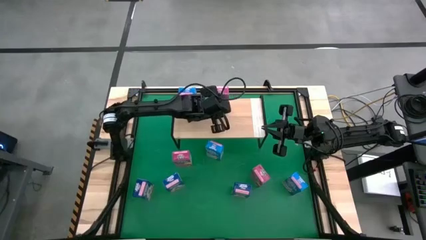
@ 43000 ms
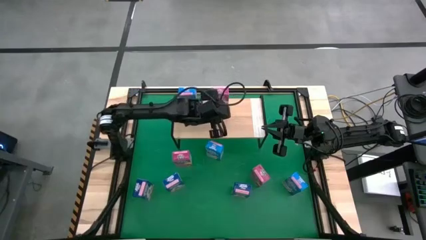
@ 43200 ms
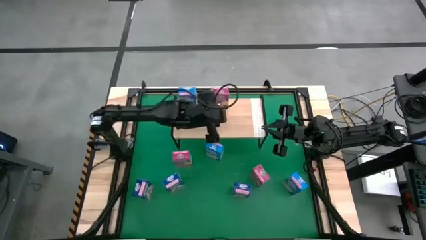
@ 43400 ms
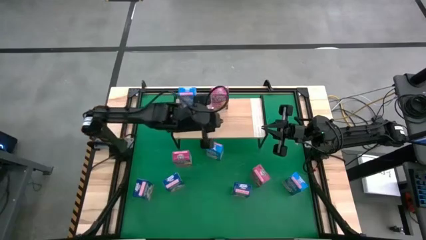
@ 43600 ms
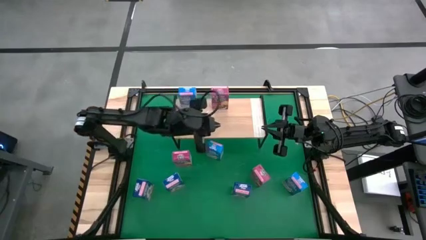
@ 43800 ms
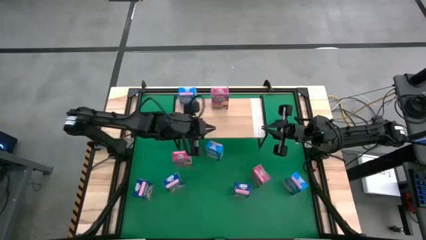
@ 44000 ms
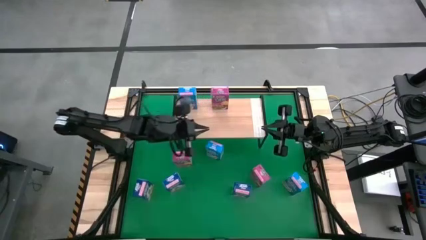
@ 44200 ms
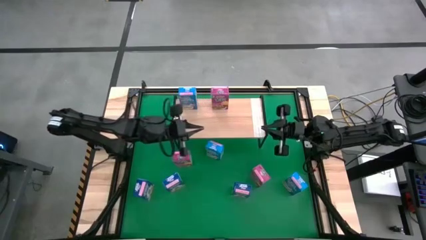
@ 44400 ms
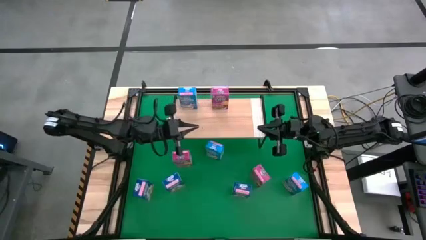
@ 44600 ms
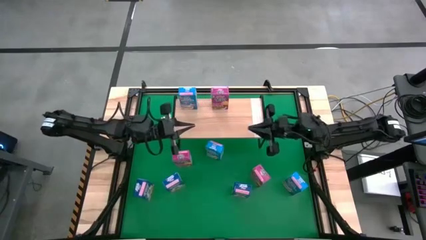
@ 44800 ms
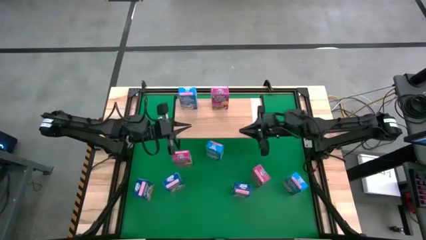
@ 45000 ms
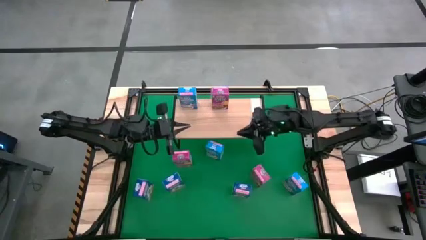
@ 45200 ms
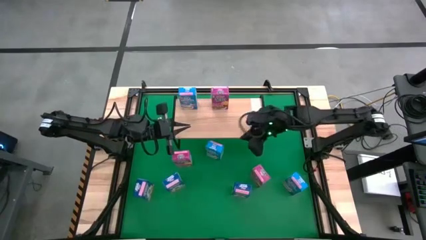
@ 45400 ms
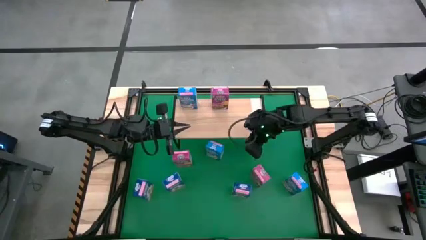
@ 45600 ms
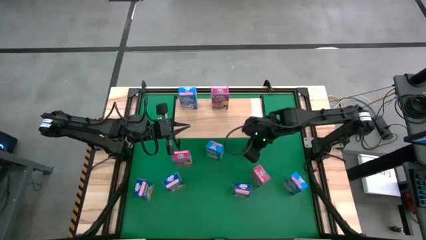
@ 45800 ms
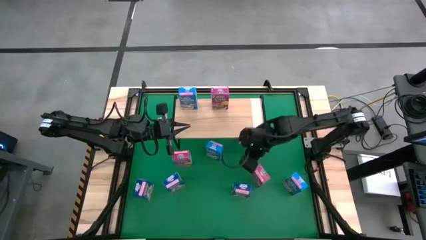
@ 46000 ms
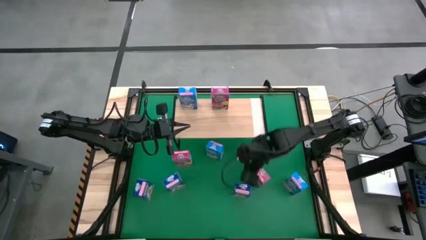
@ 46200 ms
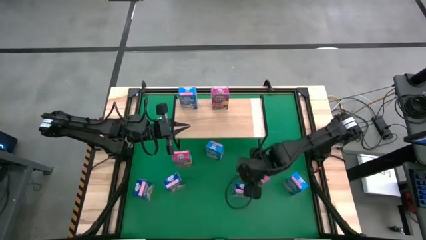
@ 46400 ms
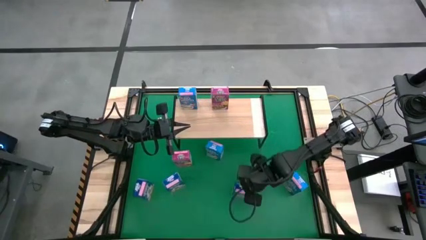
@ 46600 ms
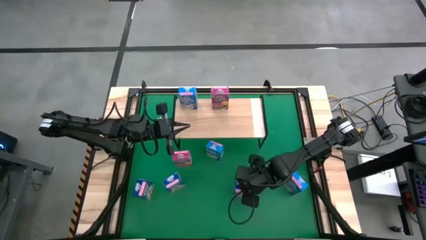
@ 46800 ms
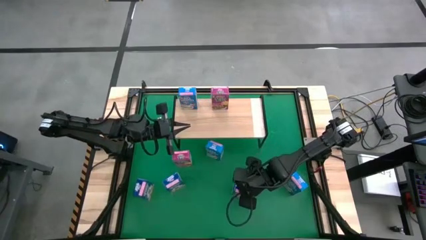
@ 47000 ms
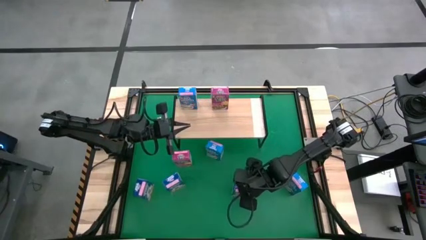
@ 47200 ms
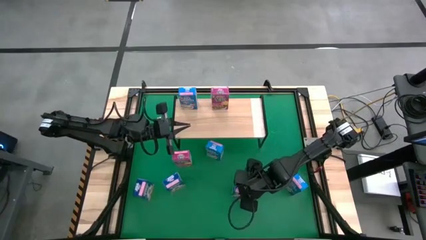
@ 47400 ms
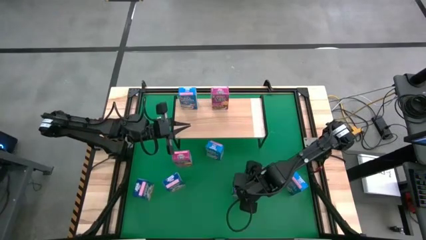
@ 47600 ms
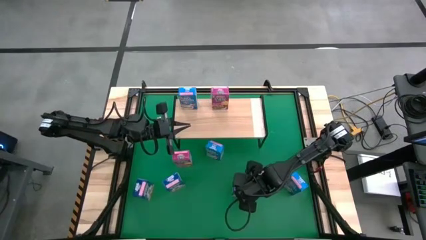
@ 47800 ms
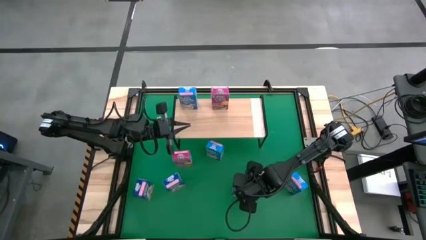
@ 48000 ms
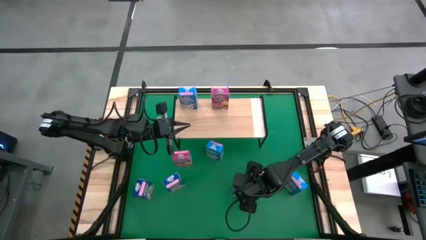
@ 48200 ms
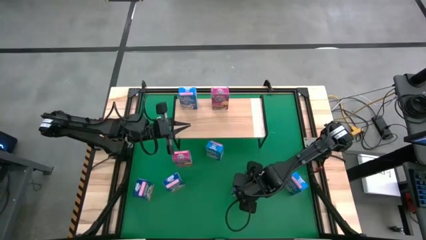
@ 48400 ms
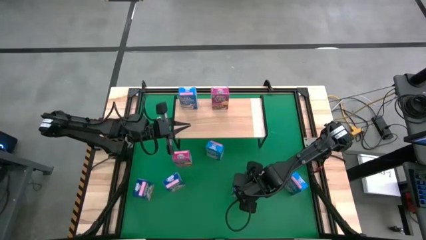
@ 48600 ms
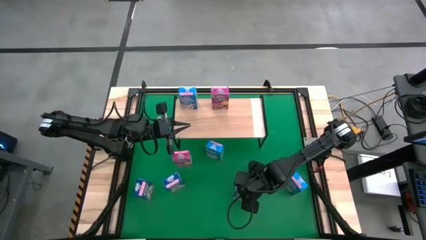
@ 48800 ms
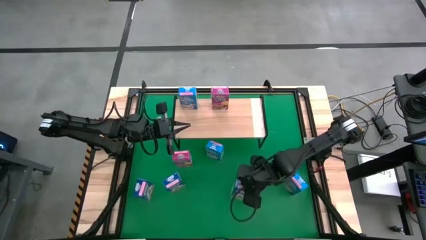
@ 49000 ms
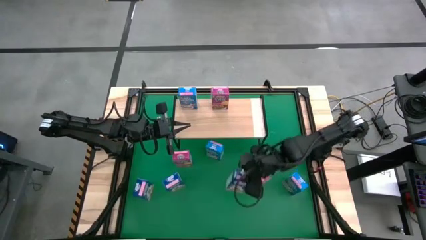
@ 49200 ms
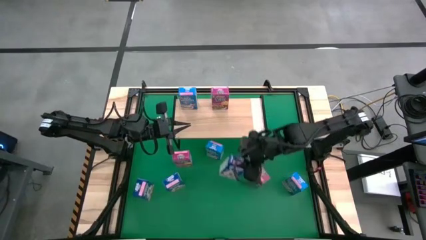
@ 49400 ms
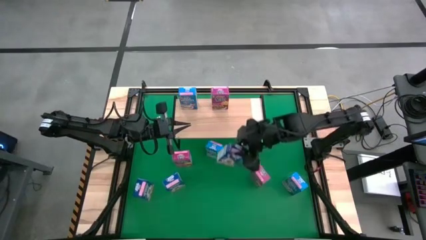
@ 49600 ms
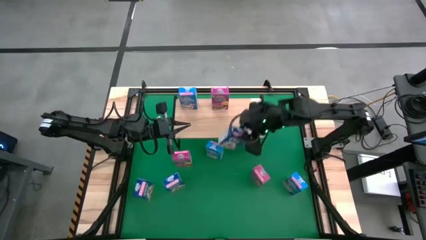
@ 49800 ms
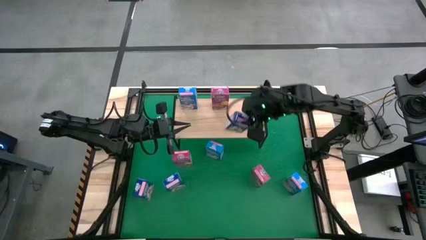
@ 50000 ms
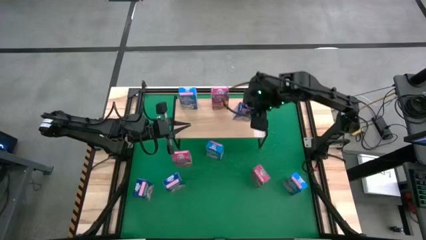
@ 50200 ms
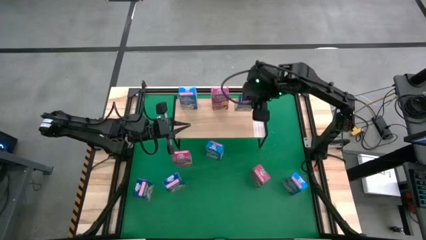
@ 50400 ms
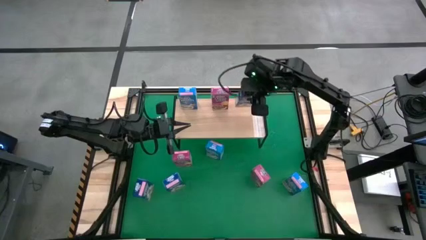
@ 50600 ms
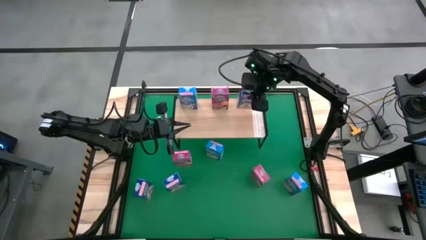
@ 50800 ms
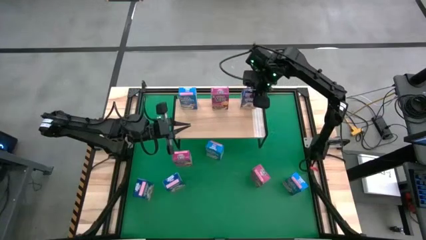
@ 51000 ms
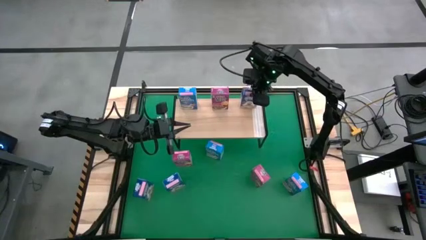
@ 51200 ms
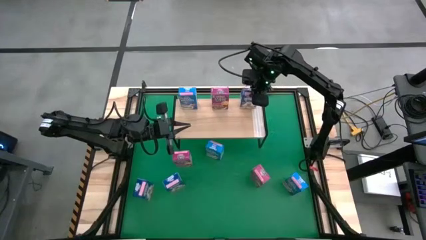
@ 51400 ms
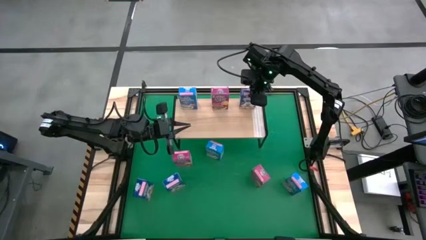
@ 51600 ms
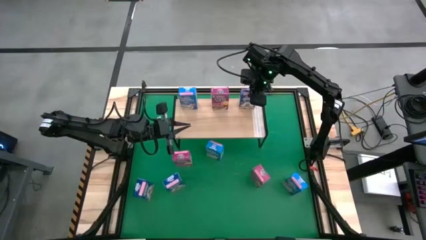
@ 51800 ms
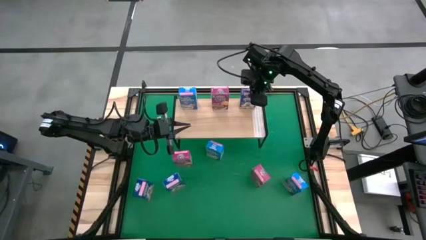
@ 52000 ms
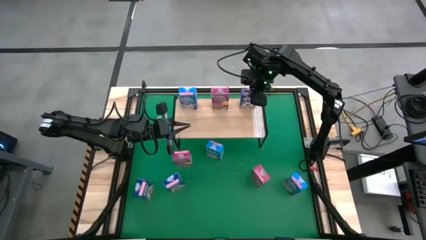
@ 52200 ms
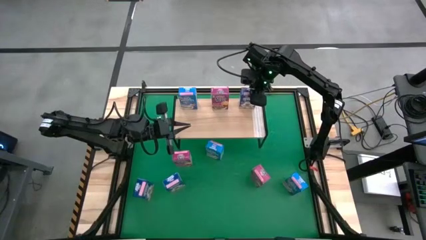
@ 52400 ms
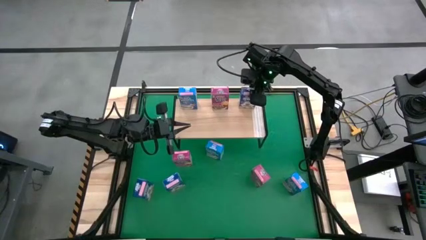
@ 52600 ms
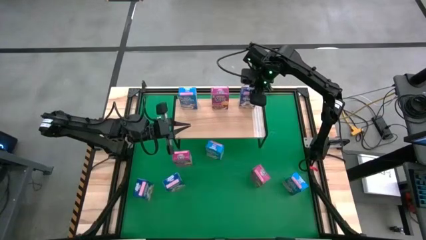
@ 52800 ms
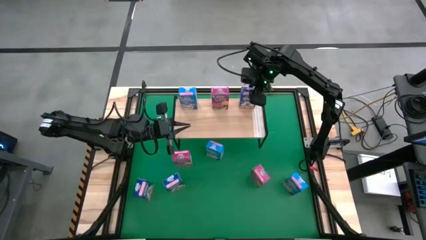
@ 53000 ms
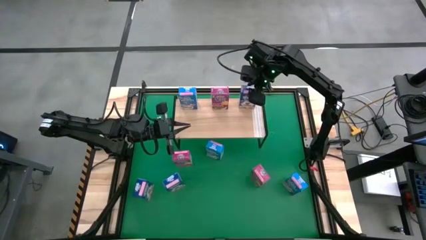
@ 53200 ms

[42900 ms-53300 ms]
Task: Stack cereal on shelf
Put the right dark blue cereal box on the shelf

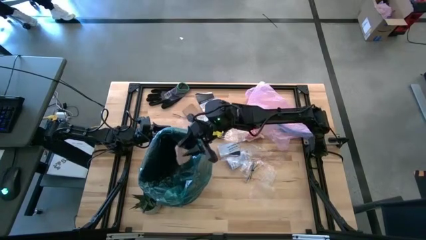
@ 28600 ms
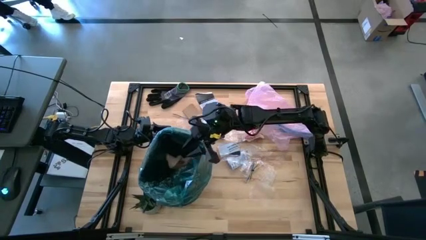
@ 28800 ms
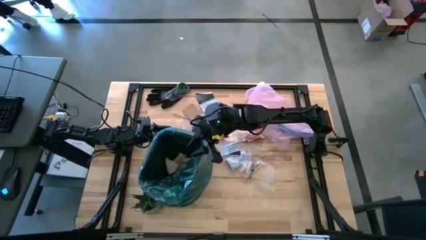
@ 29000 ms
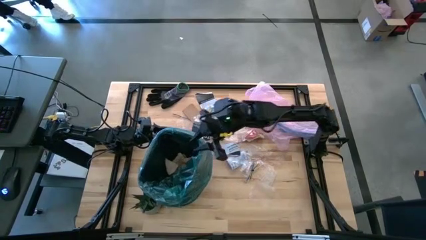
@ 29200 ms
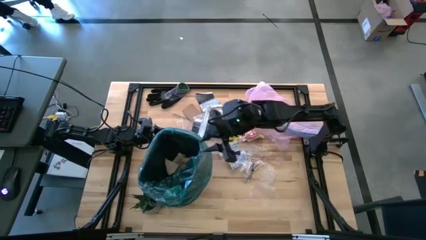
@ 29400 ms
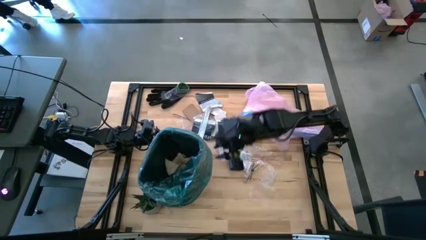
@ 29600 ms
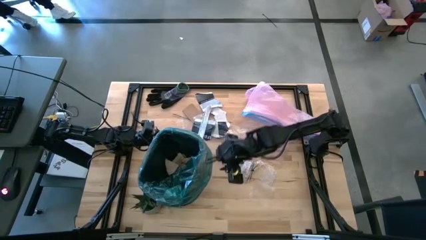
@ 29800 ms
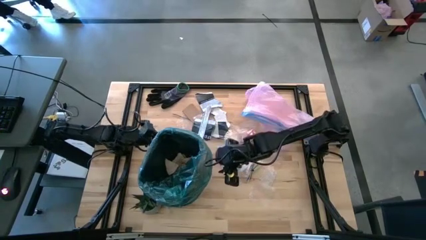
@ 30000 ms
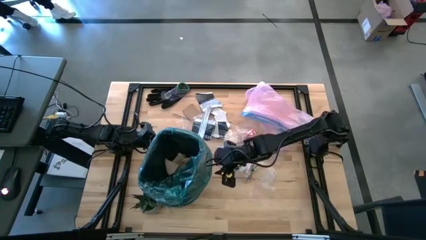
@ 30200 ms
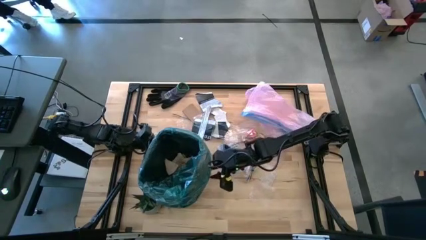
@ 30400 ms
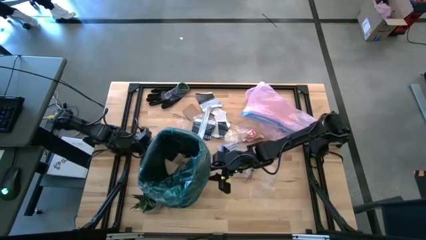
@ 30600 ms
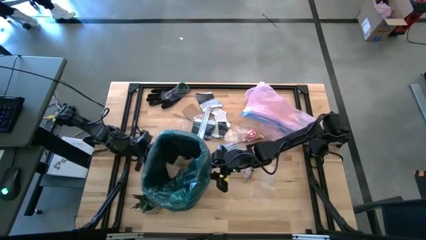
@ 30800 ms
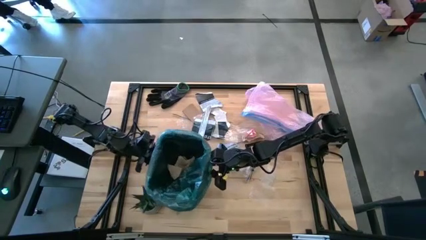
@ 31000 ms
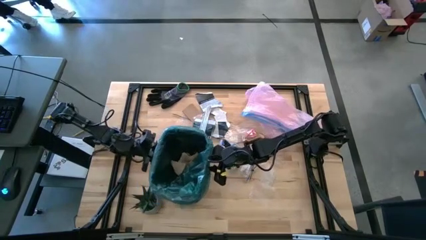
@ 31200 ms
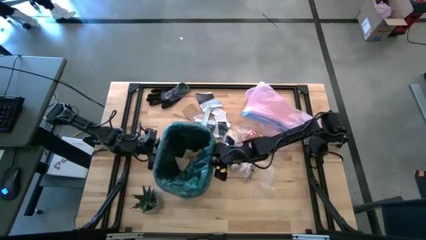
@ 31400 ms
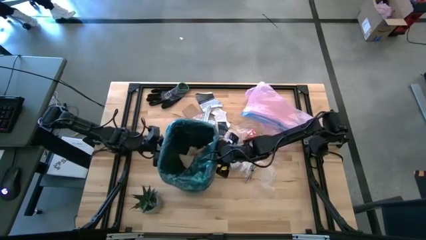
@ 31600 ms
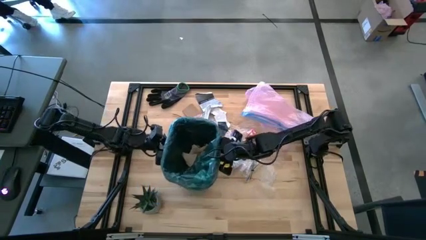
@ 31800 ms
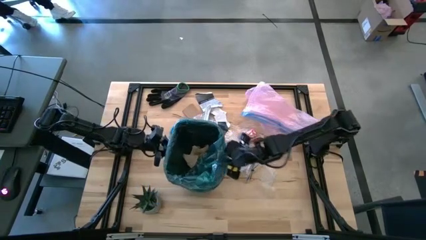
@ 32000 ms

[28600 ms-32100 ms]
Task: place trash/remove bag and relplace
Adjust the trash bin

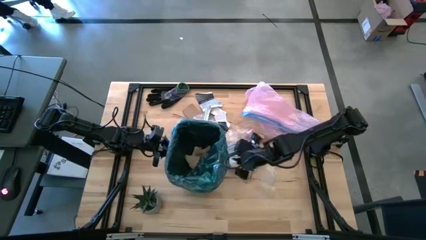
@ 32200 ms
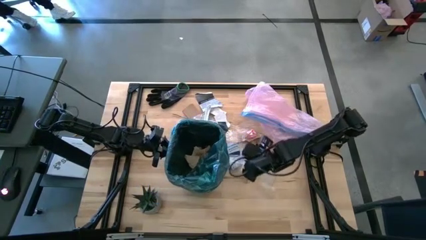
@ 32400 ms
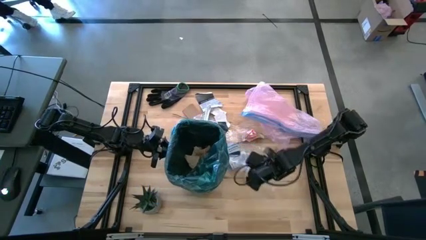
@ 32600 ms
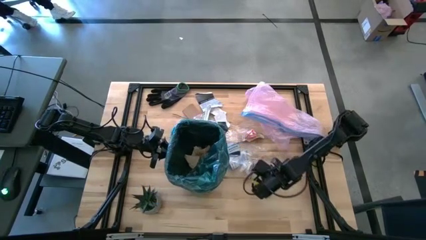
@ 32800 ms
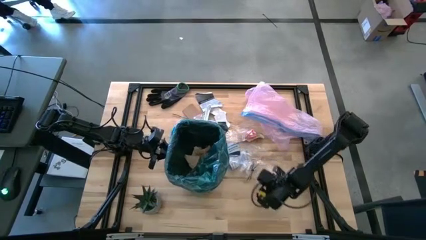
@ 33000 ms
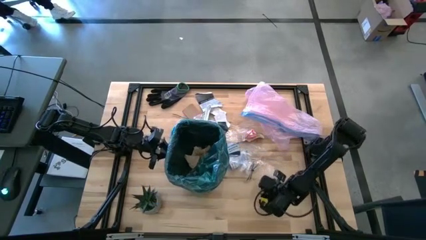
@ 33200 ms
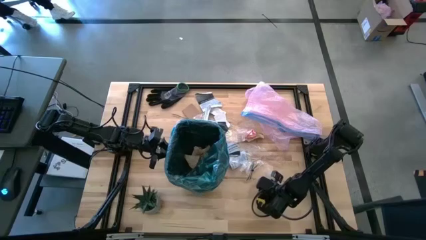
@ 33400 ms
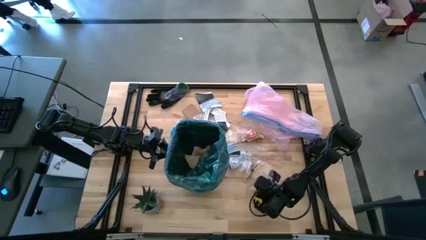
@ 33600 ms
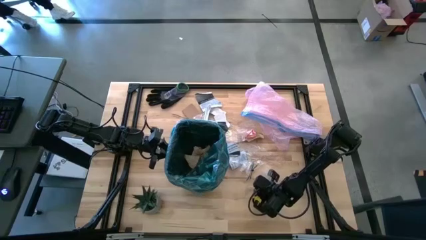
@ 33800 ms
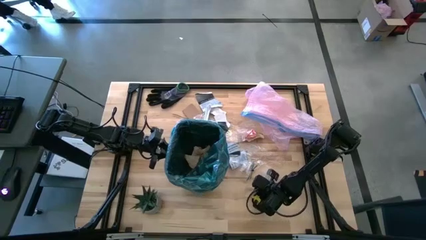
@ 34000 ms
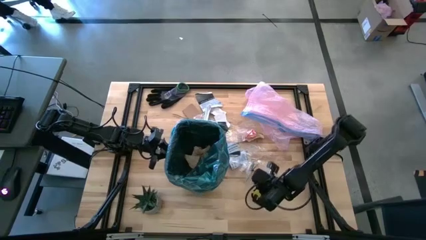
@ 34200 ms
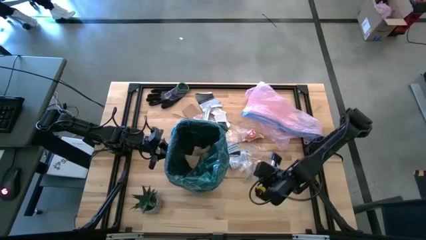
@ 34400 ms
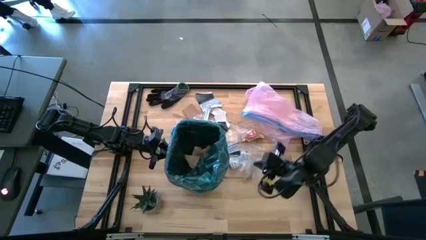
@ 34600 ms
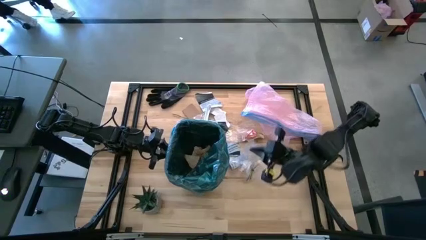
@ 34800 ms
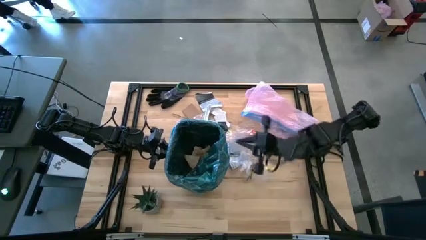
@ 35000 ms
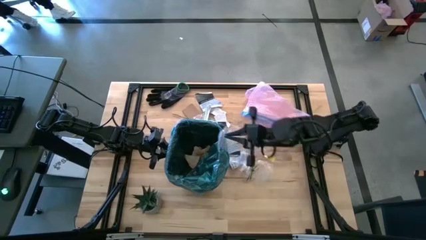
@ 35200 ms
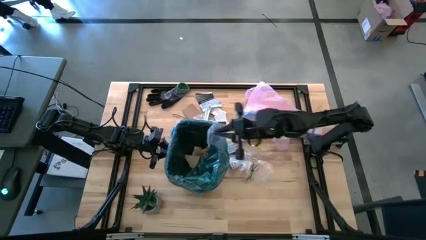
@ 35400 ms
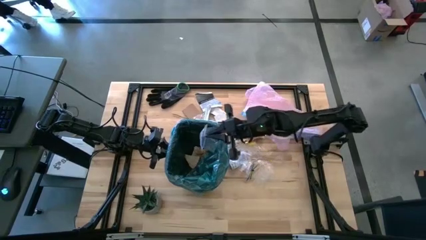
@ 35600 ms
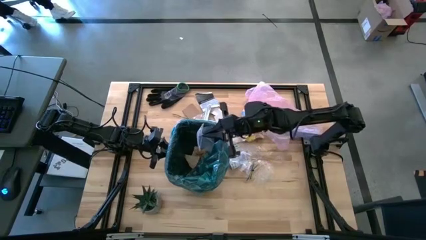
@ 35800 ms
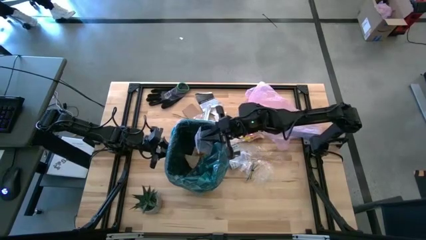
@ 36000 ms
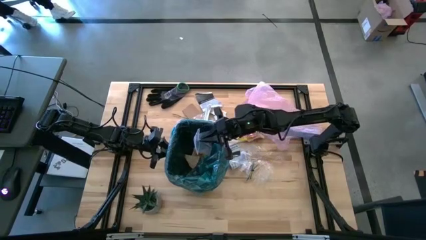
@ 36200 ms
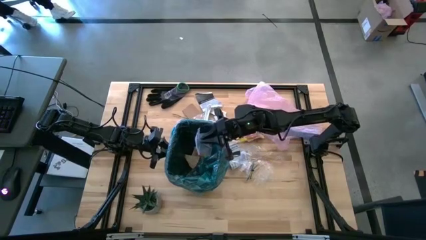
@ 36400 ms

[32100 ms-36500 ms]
Put the transparent plastic into the trash bin
